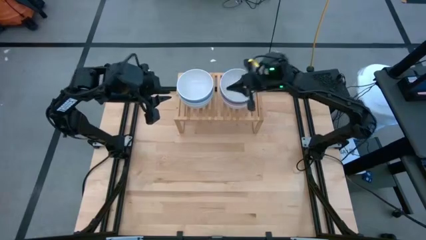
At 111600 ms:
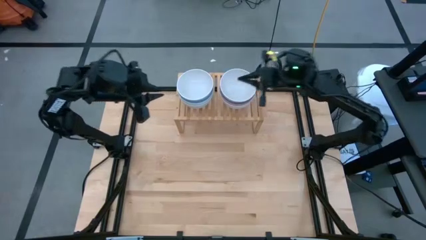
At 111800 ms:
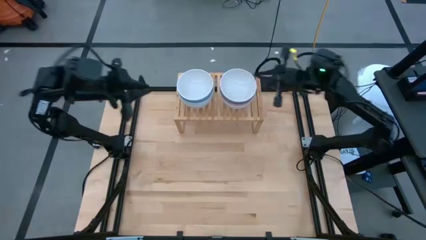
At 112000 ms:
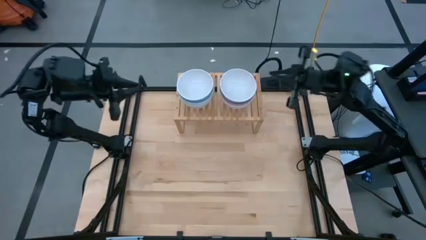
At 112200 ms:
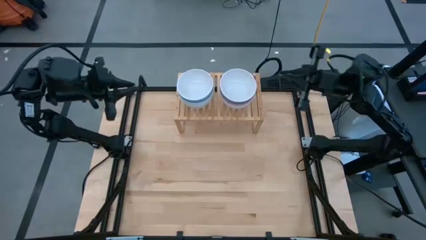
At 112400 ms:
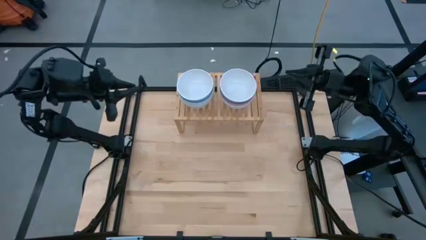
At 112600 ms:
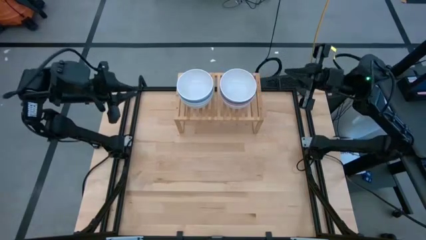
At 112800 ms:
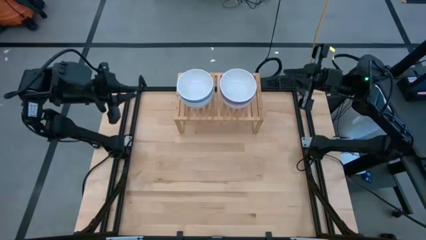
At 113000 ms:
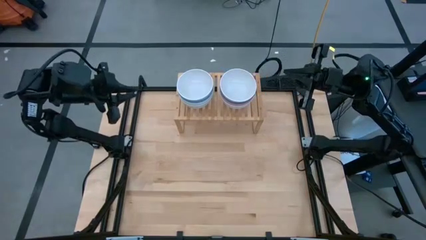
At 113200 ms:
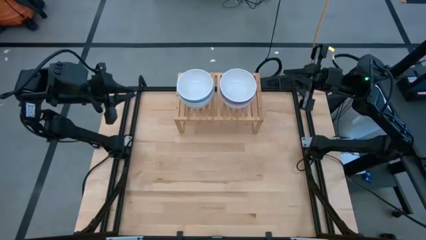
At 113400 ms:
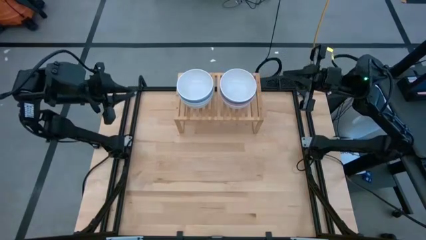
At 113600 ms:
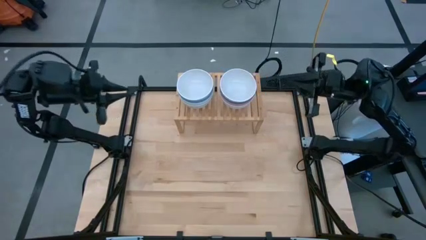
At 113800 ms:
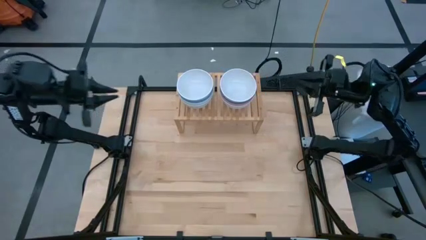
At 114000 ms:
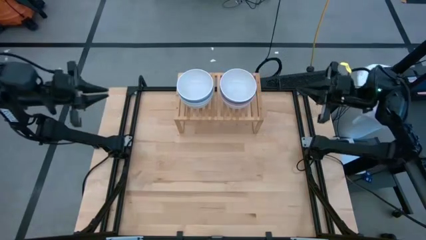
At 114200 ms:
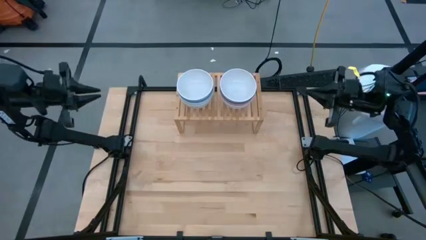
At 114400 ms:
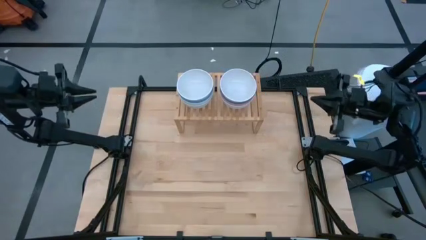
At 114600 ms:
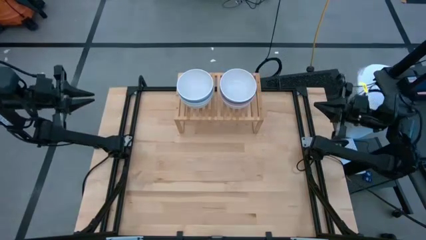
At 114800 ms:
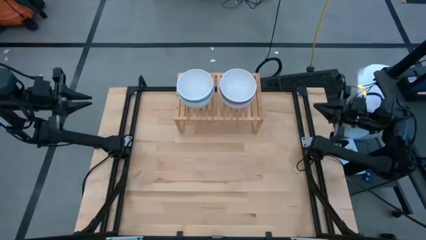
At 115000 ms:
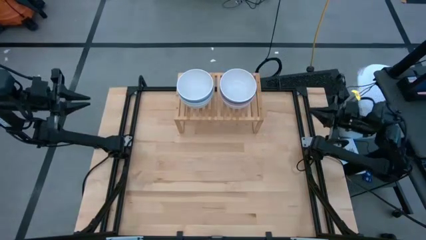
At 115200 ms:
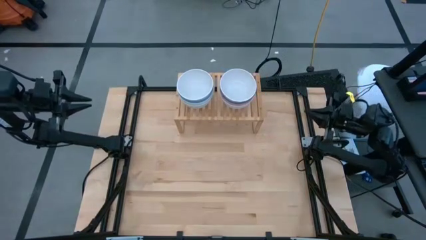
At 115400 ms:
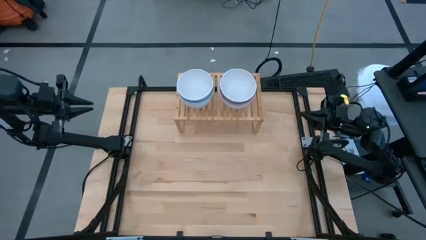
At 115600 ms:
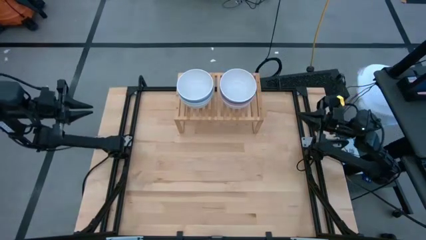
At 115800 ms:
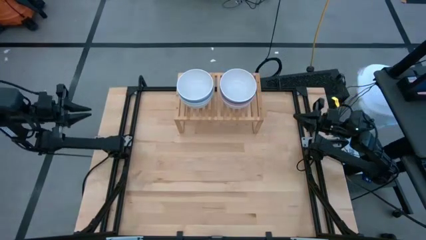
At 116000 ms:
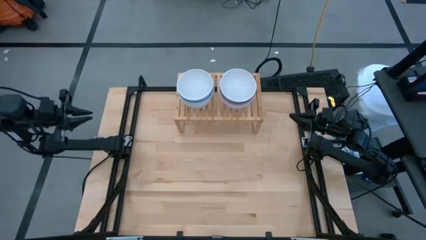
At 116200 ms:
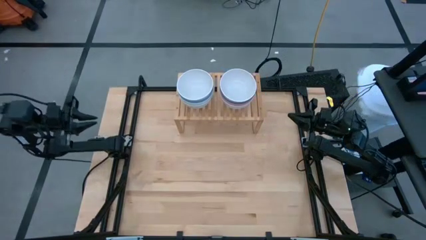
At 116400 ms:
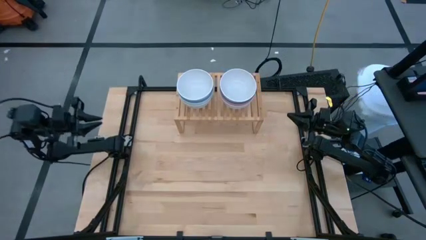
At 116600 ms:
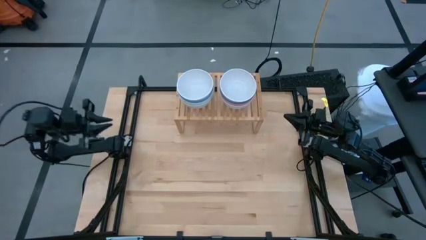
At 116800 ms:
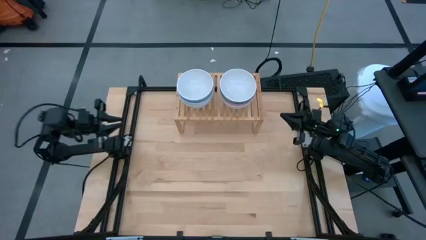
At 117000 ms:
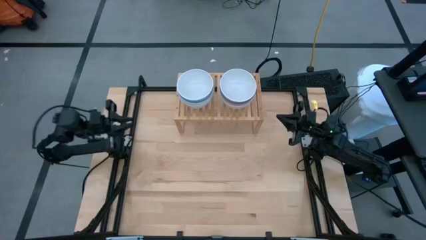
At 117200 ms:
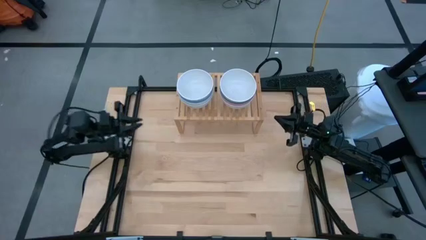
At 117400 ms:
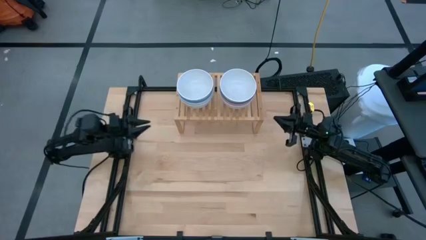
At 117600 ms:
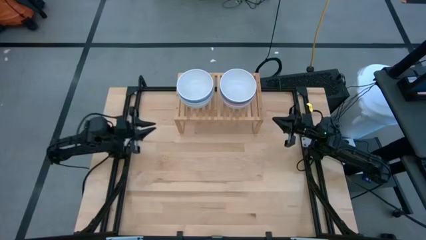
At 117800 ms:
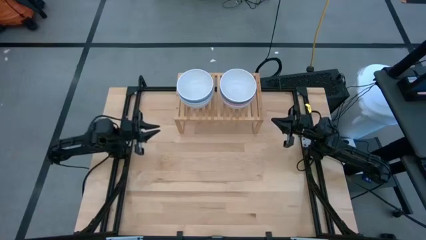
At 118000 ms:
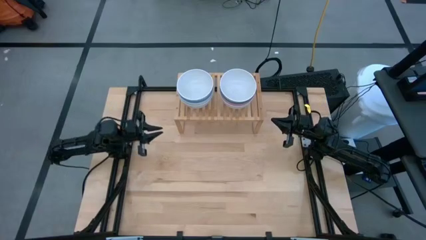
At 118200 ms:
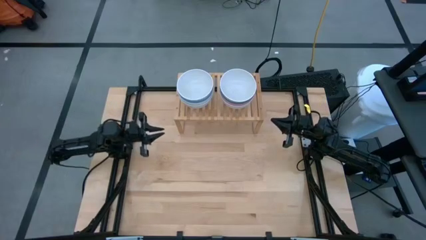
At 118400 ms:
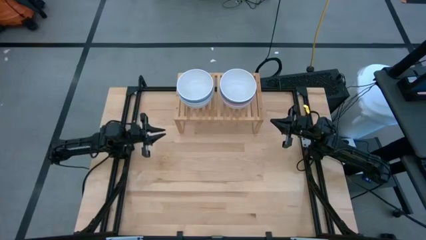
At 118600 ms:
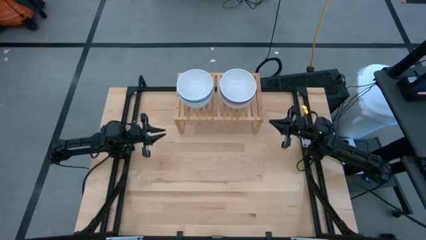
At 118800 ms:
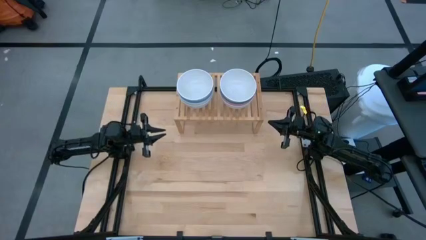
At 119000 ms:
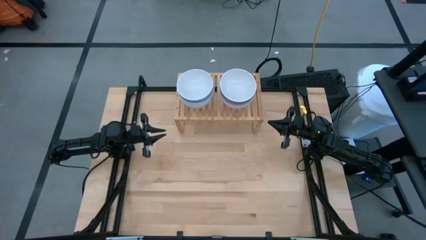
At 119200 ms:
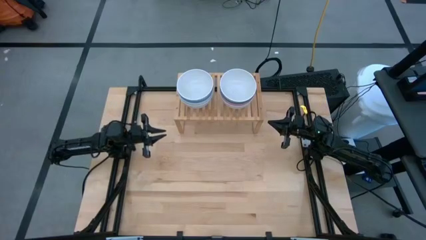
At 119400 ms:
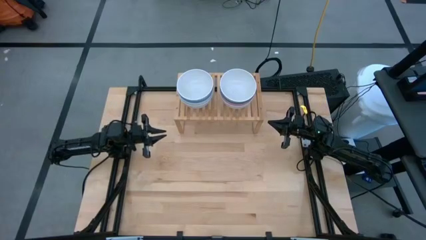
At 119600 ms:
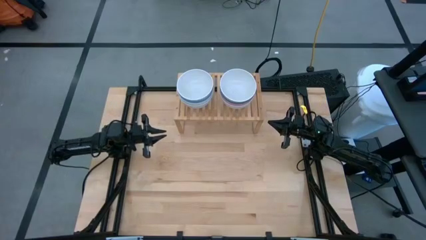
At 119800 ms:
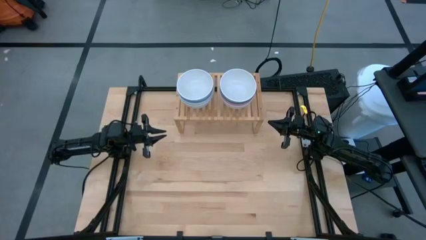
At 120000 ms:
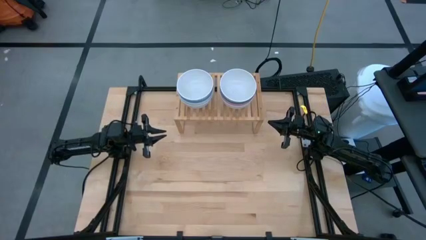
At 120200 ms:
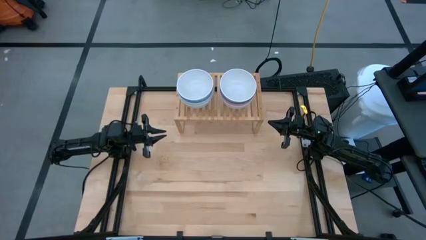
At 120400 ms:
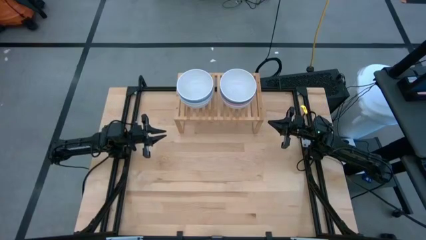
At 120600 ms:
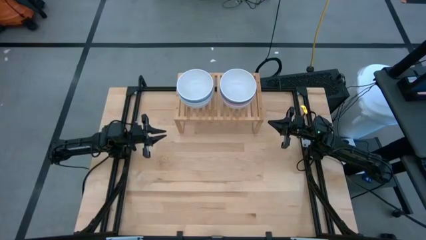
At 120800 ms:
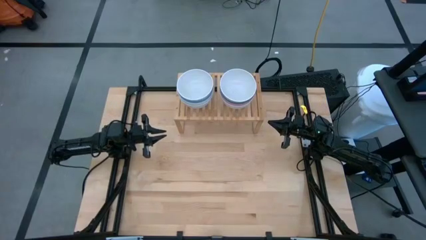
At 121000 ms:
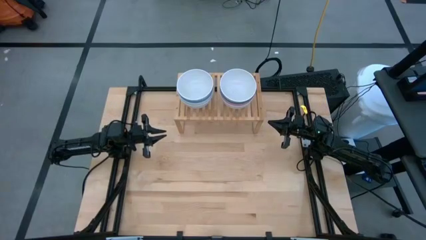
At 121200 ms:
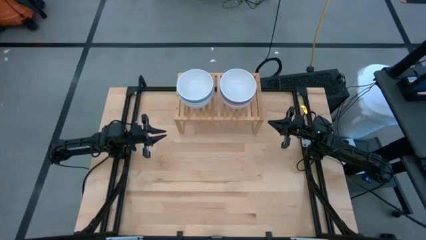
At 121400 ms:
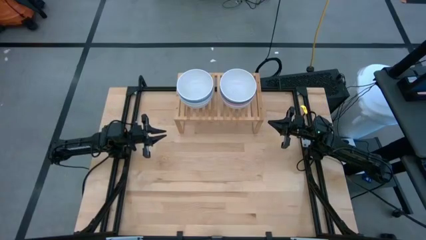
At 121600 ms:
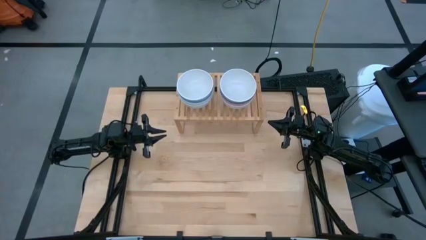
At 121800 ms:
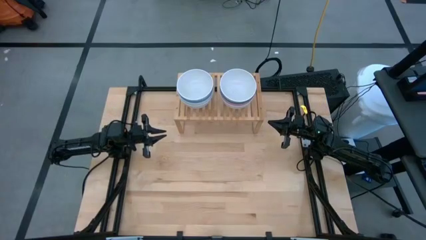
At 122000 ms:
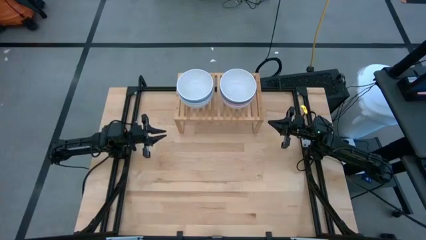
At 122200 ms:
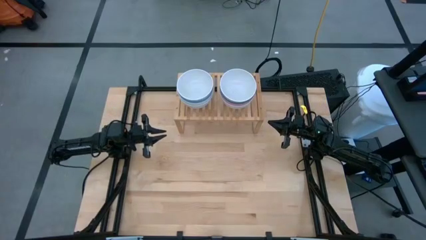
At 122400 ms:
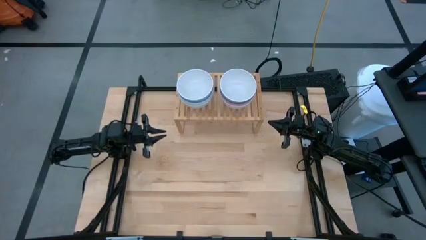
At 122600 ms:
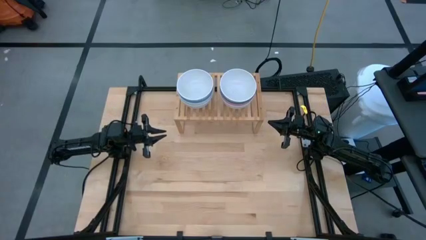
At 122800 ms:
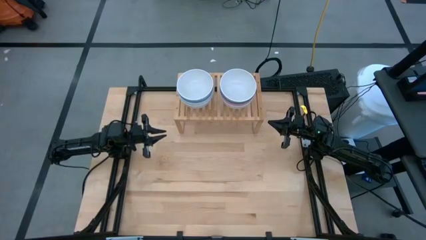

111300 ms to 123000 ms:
Task: Place and stack bowls onto a shelf
Return to Home Position
